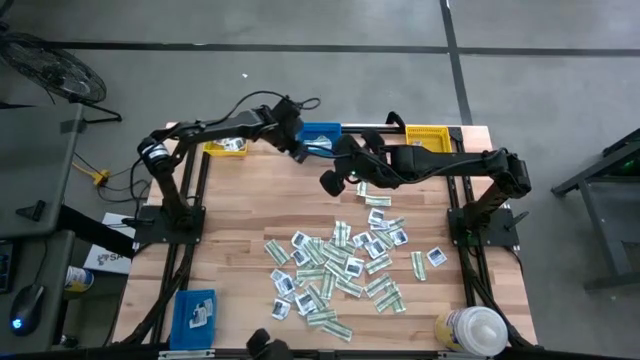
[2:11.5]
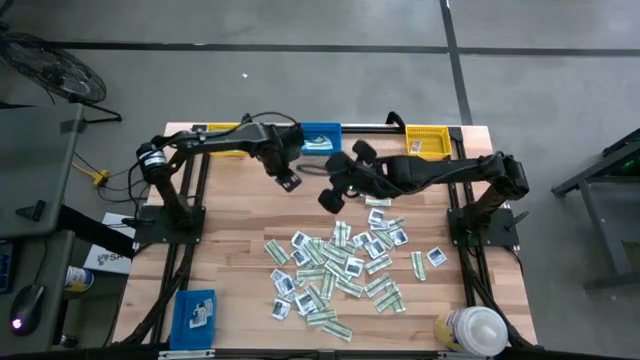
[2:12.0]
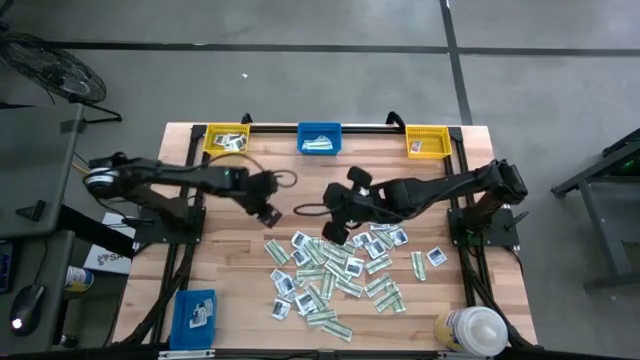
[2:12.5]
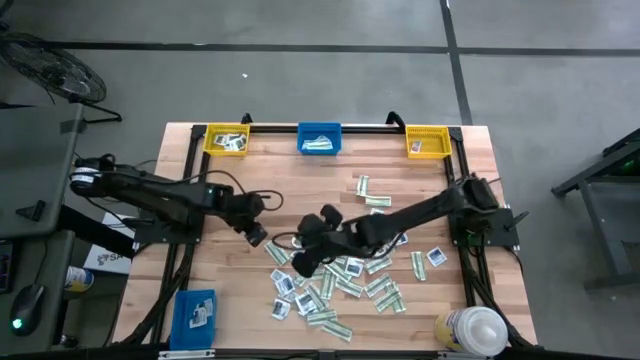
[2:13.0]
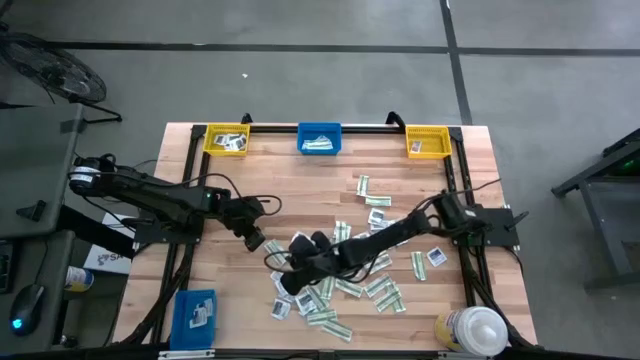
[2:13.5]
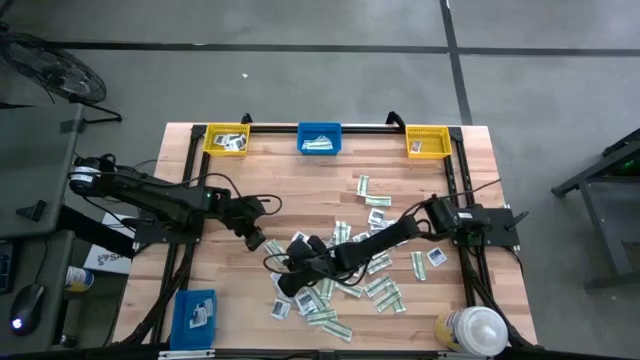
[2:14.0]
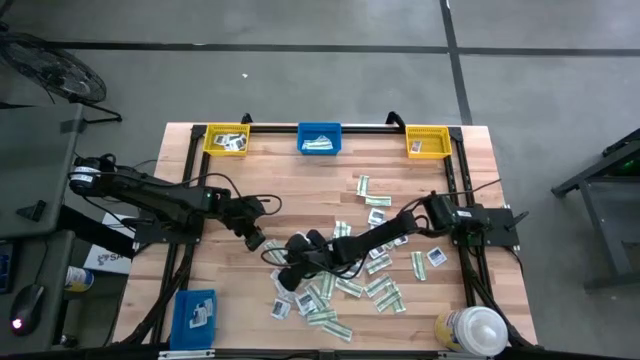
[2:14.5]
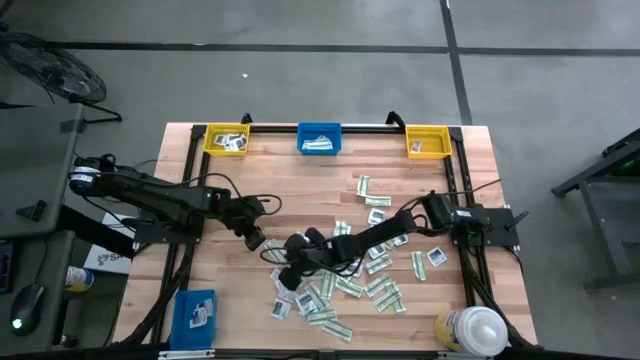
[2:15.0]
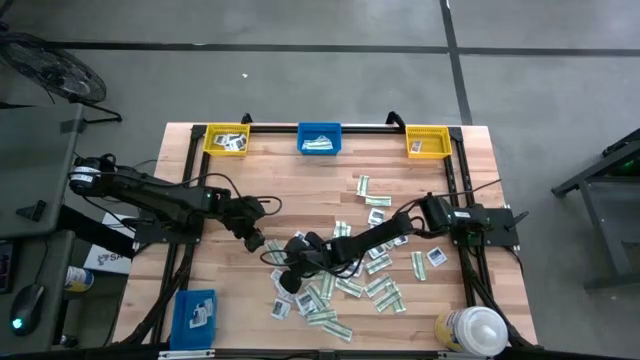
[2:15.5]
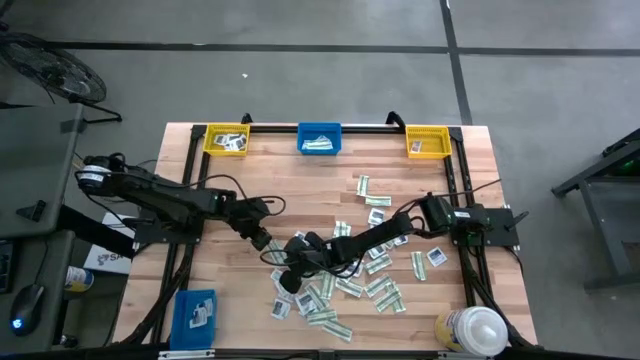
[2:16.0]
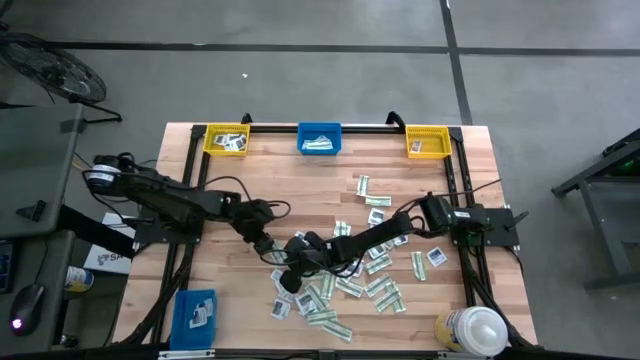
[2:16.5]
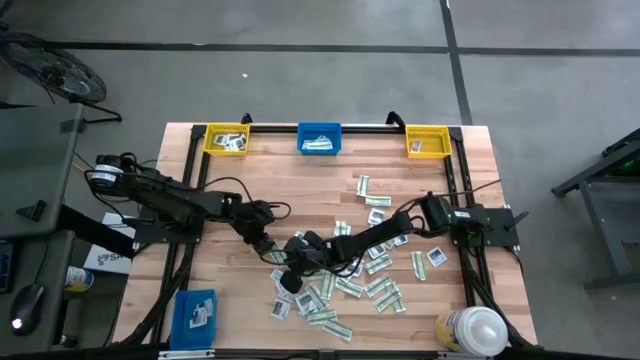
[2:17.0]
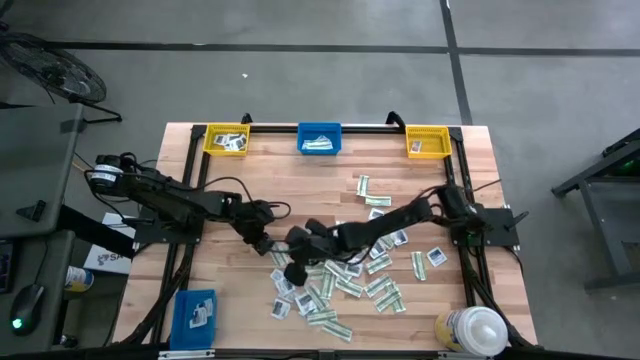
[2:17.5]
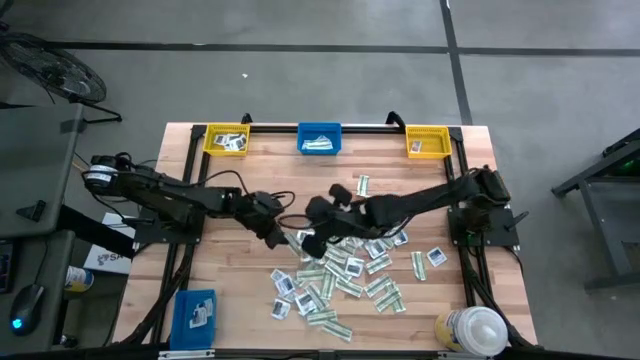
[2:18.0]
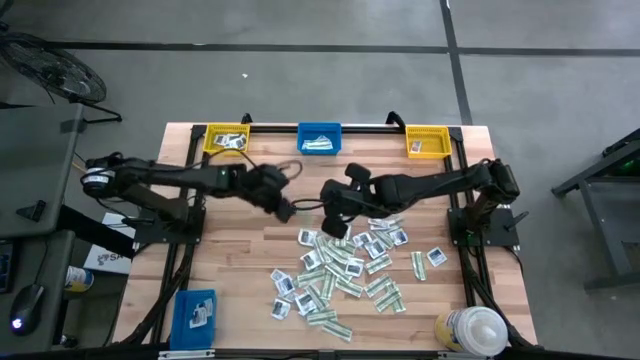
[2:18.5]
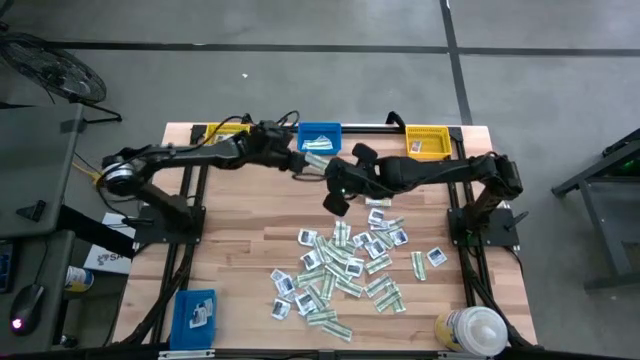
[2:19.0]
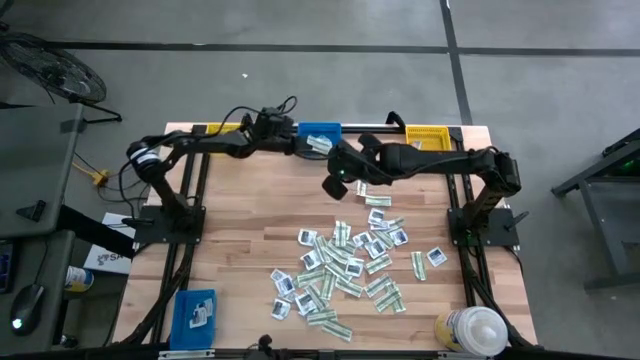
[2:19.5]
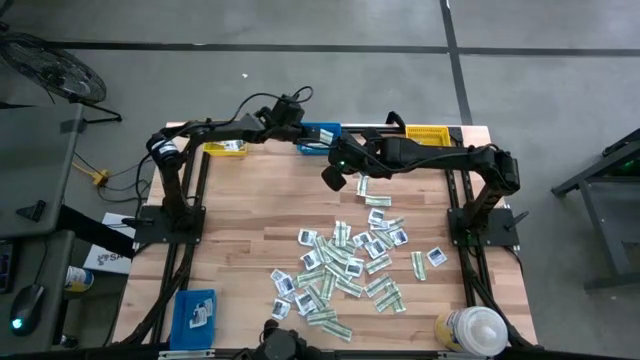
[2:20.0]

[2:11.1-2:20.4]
Task: Pick & Place First Aid Supplies
Put the green bandage pack into the top blue bin

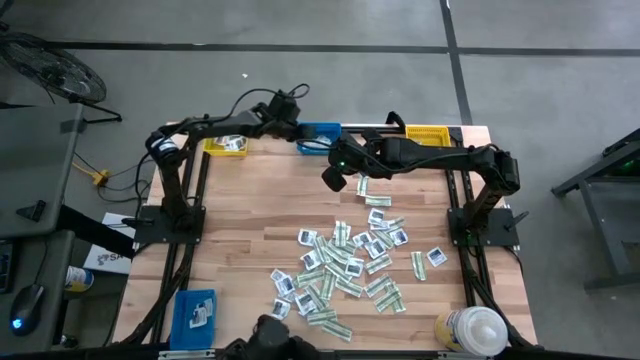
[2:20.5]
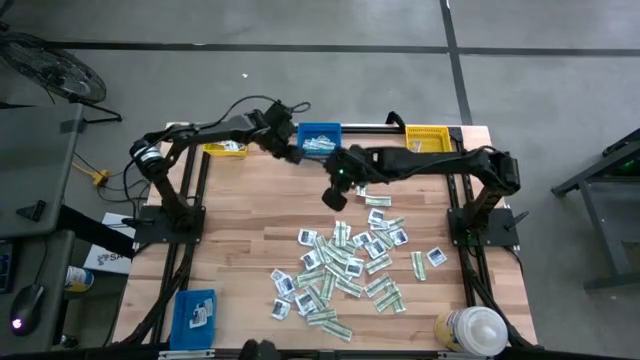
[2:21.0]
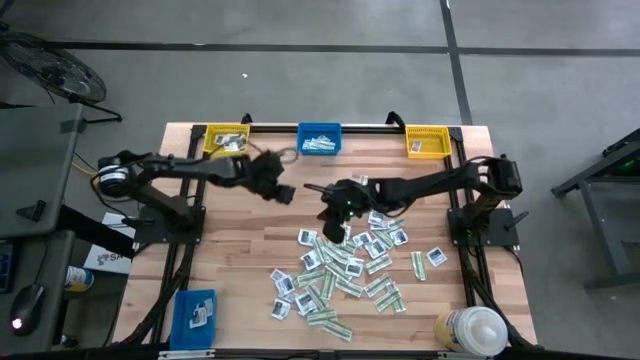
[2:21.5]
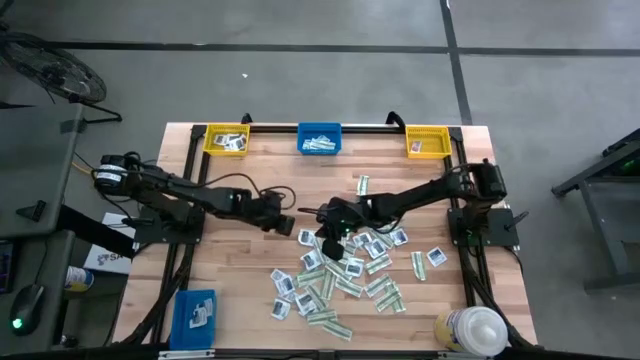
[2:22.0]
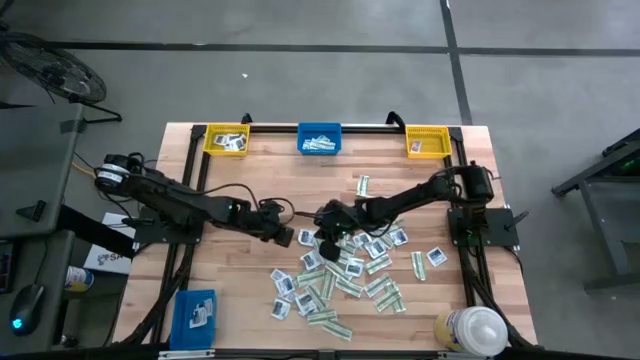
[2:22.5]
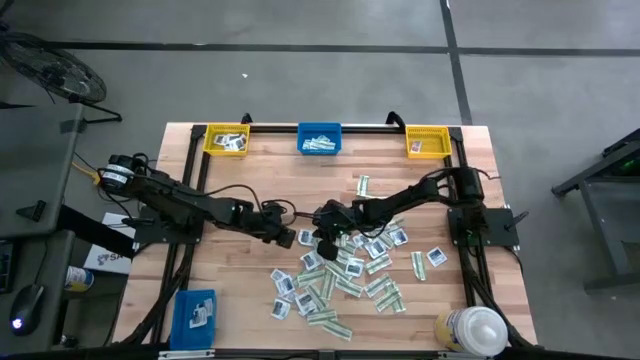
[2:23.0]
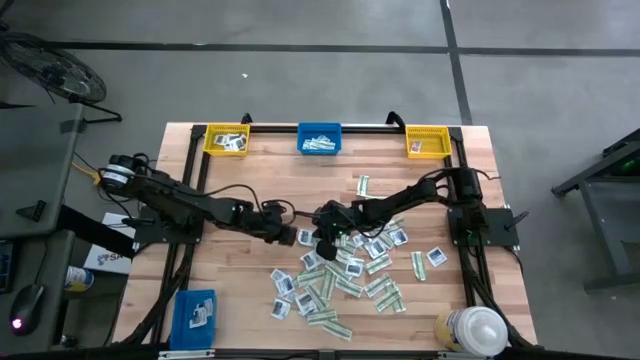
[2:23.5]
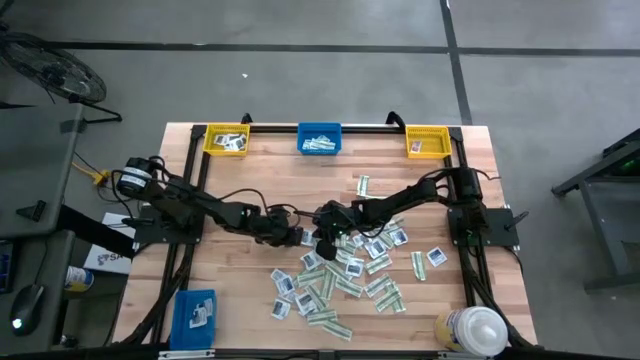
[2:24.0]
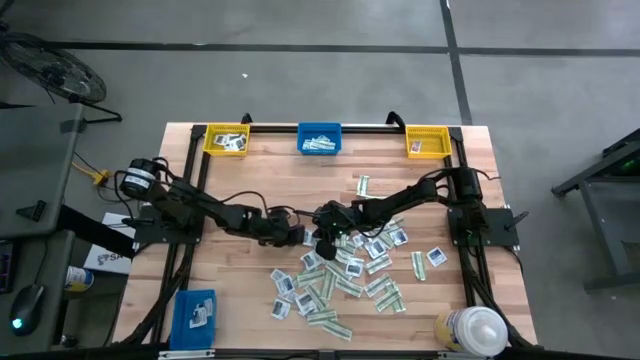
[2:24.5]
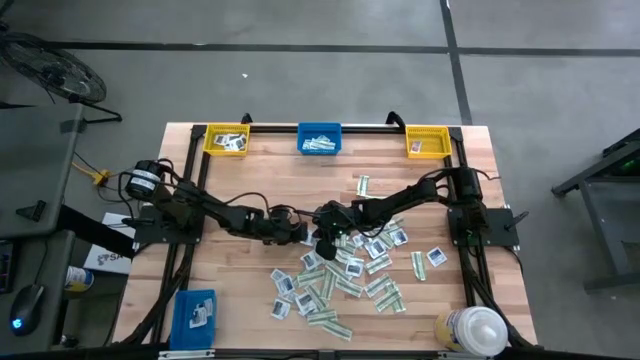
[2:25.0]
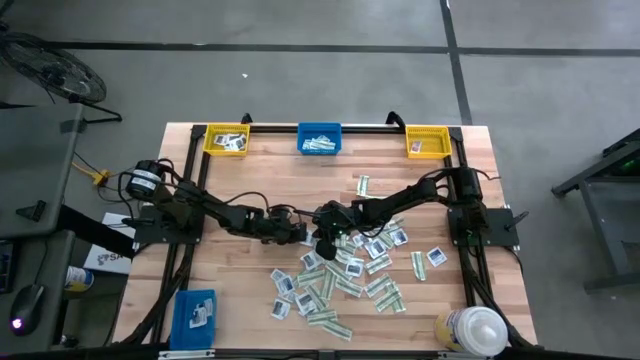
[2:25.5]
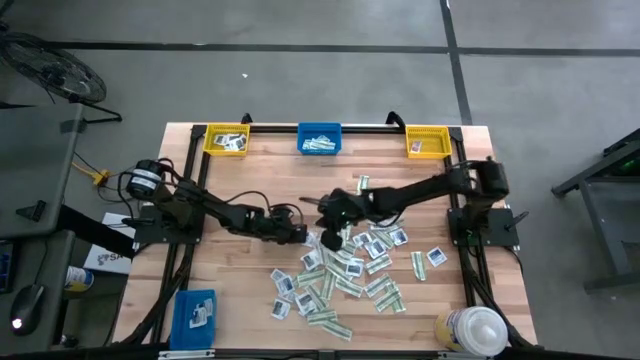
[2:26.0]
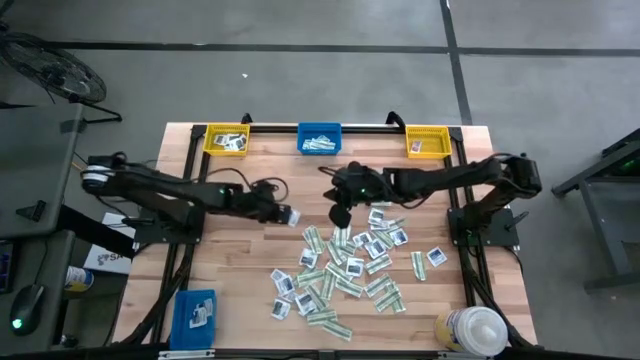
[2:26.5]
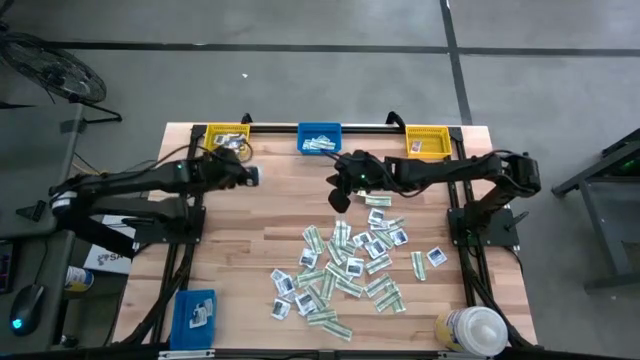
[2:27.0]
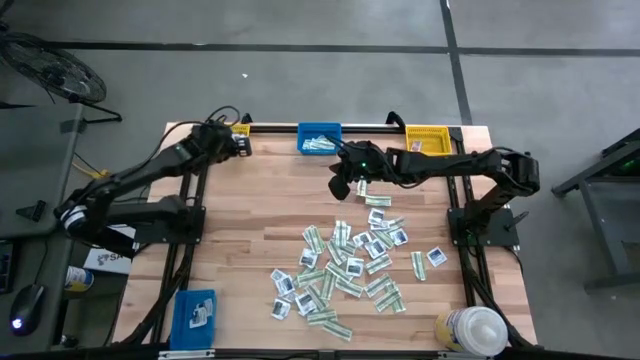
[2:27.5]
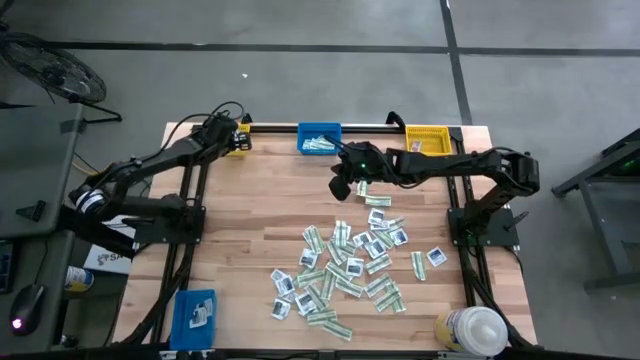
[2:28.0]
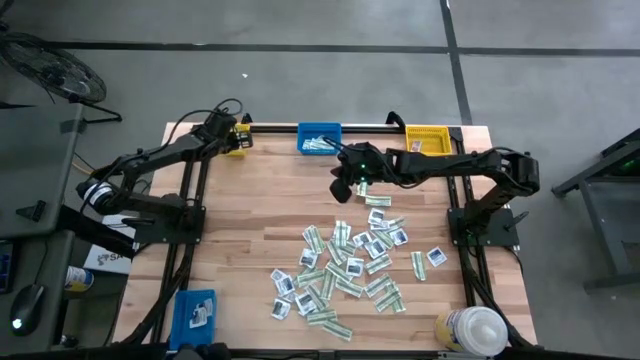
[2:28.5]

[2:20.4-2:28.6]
Put the gray towelette pack into the left yellow bin

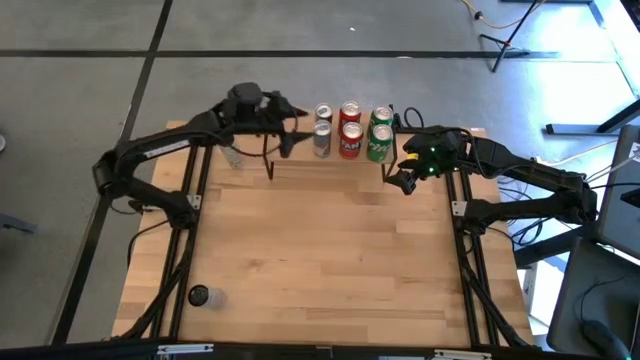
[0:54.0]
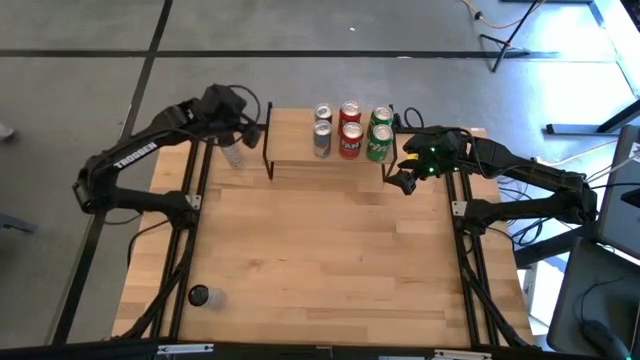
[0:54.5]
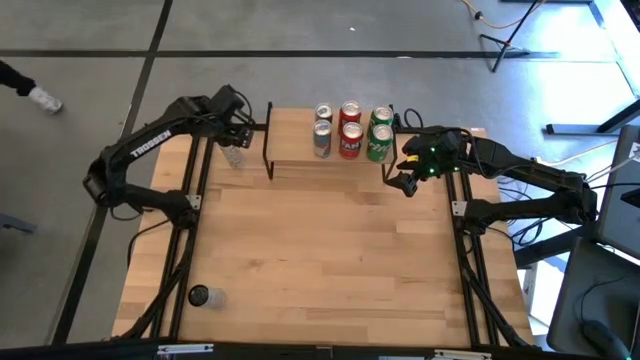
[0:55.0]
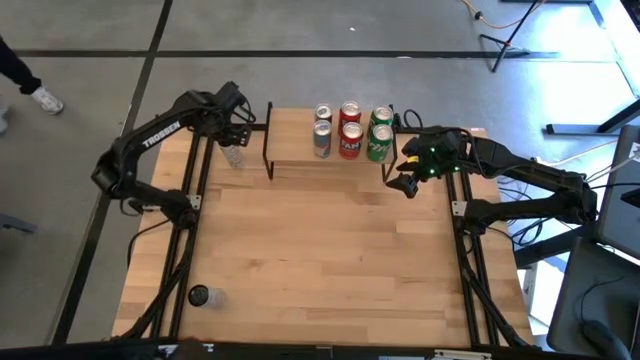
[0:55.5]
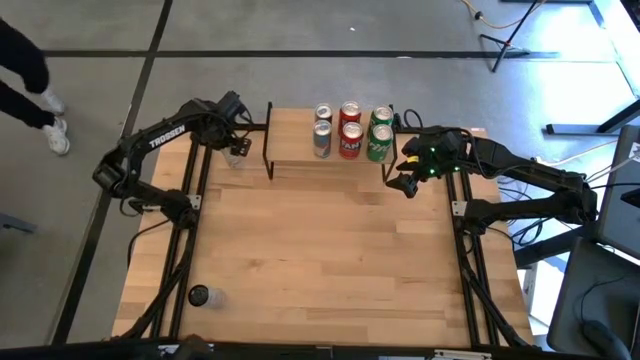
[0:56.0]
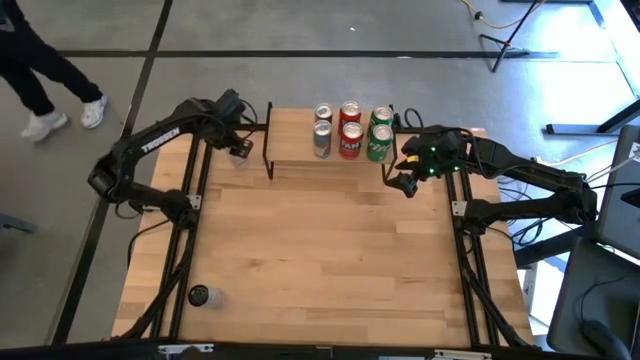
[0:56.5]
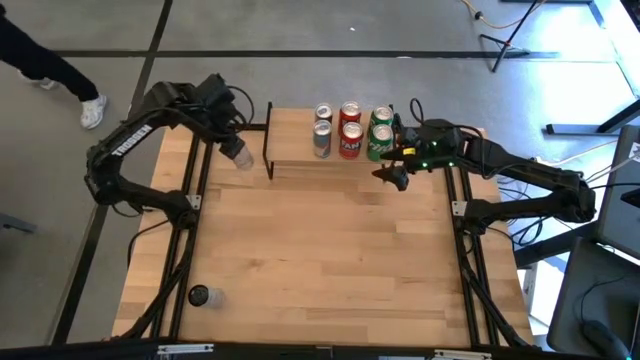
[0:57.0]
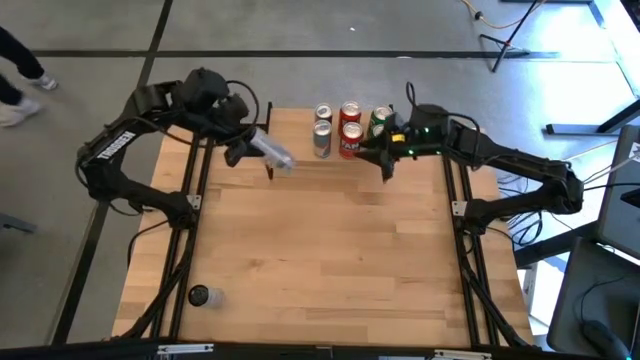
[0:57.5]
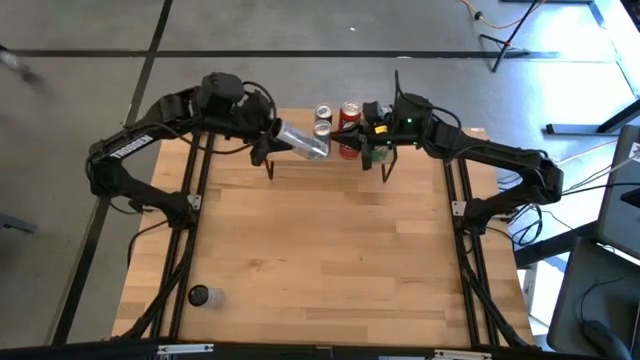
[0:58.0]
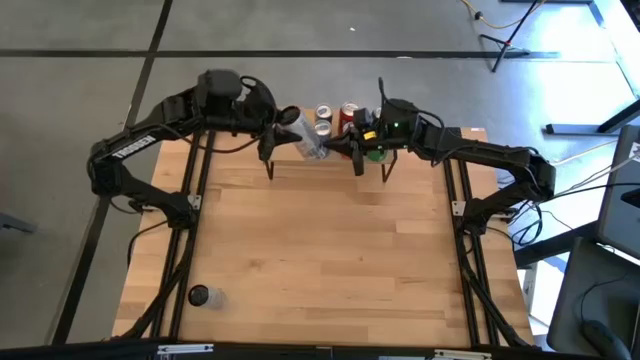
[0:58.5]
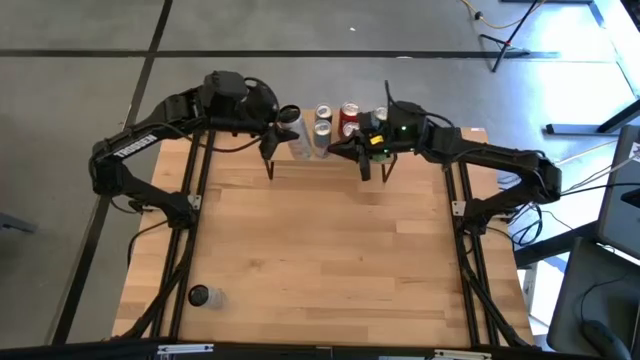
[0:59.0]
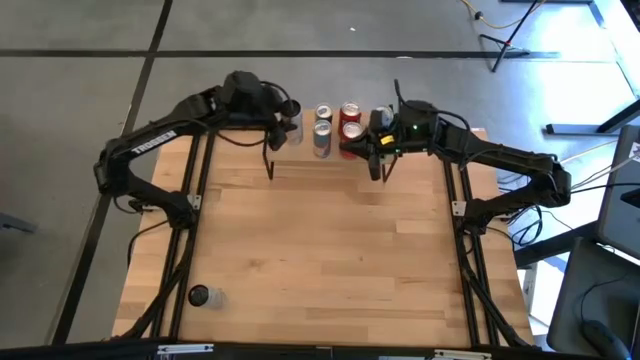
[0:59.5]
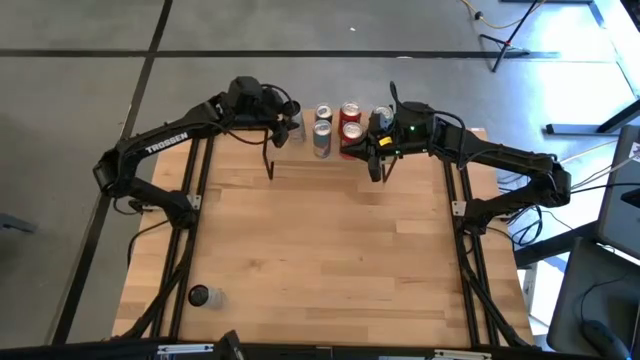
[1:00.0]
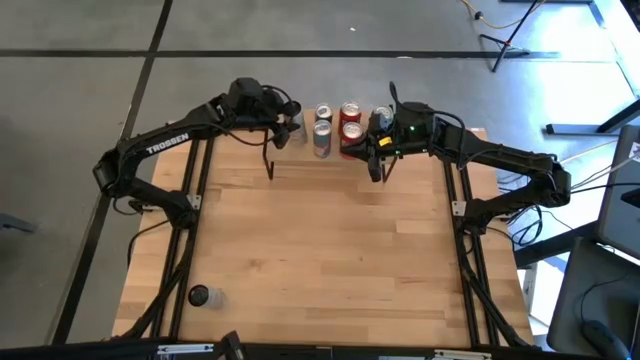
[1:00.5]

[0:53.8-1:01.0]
Task: Place canned beverage on shelf
Put the top black soda can on the shelf
